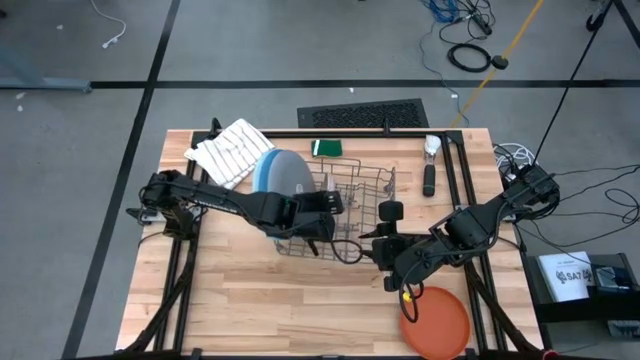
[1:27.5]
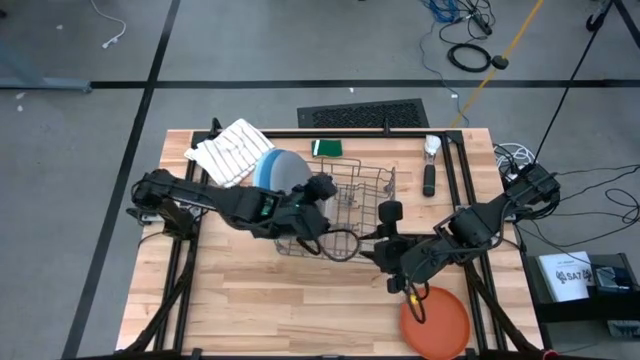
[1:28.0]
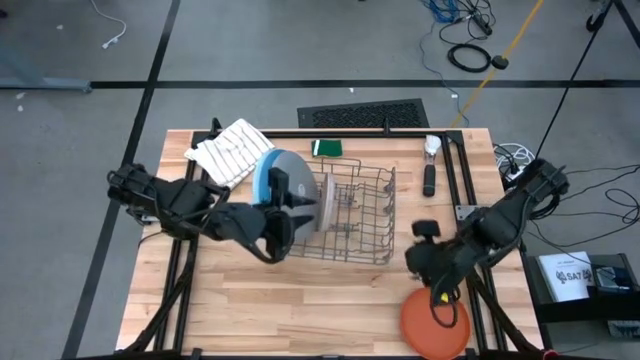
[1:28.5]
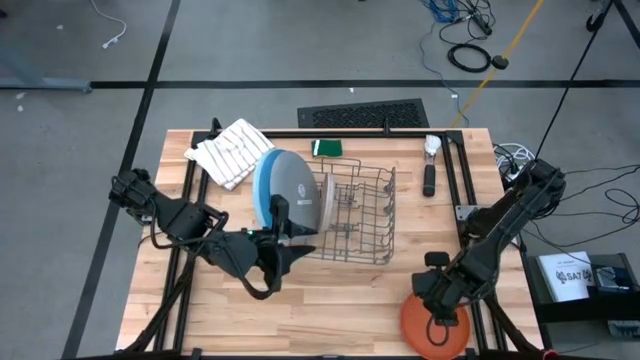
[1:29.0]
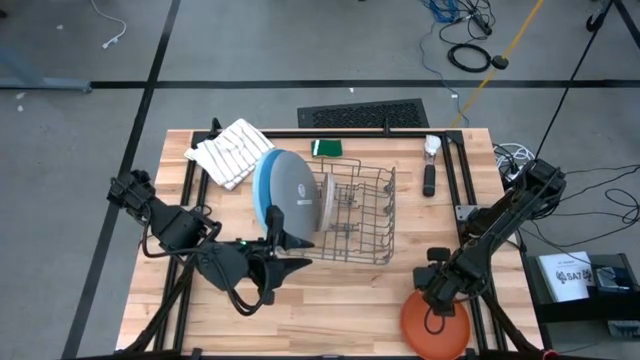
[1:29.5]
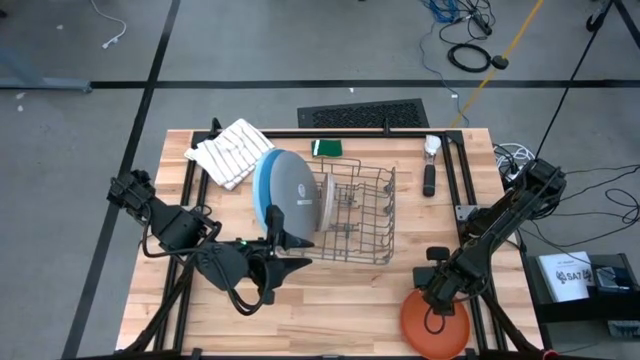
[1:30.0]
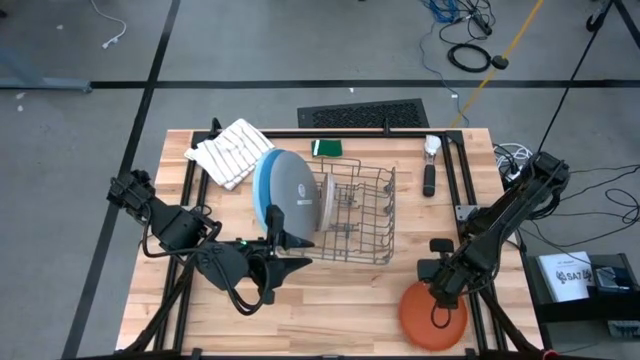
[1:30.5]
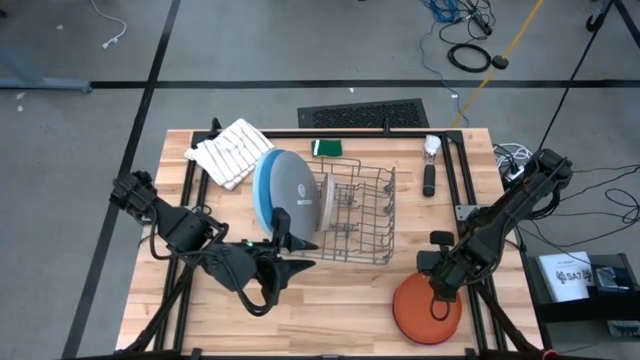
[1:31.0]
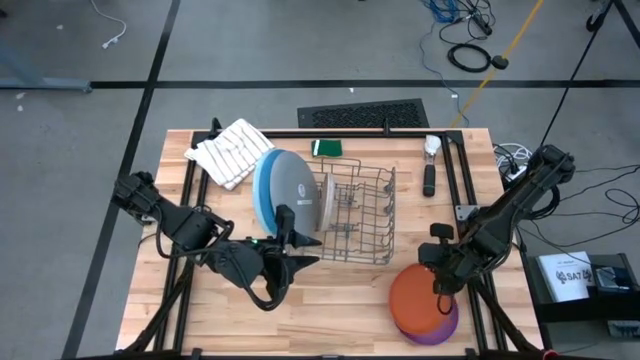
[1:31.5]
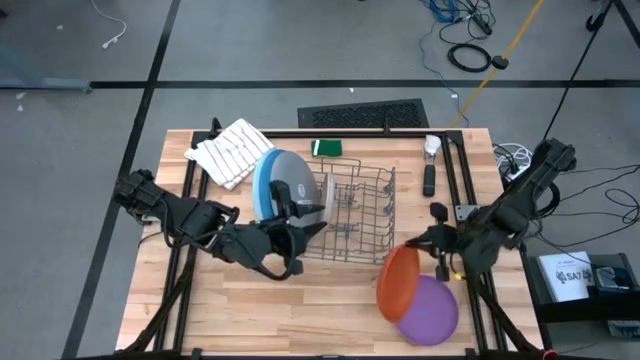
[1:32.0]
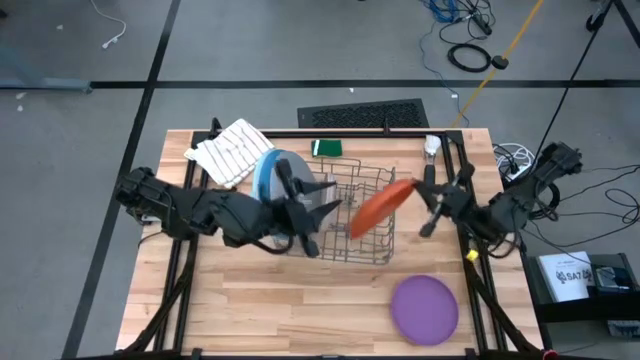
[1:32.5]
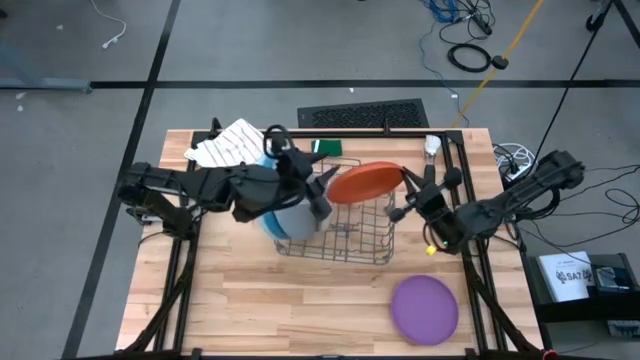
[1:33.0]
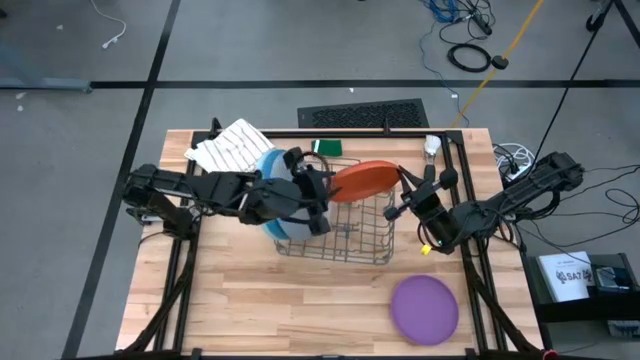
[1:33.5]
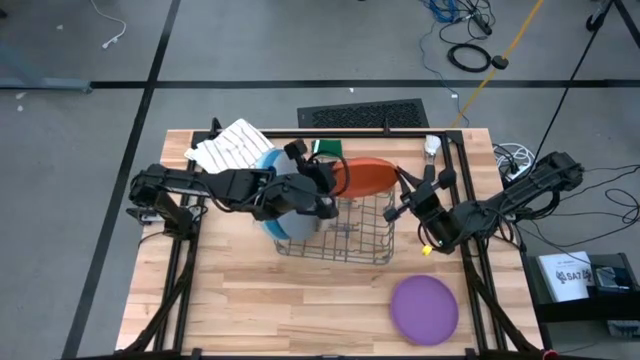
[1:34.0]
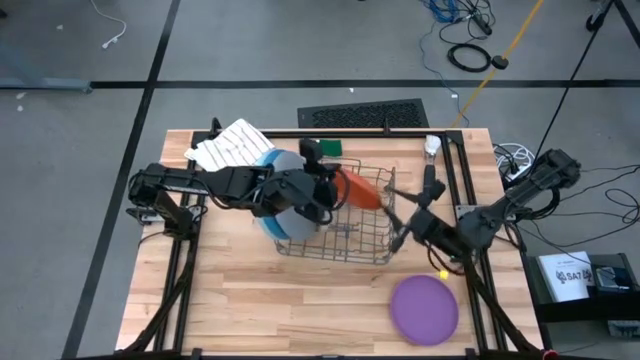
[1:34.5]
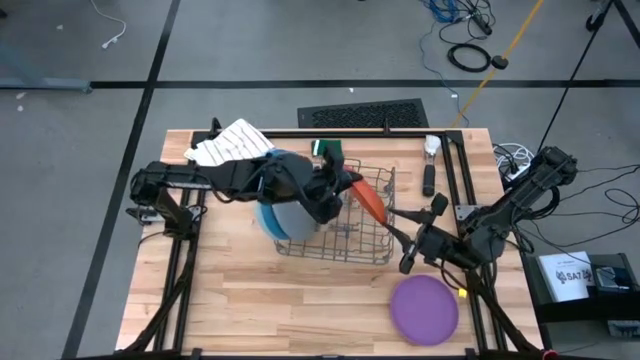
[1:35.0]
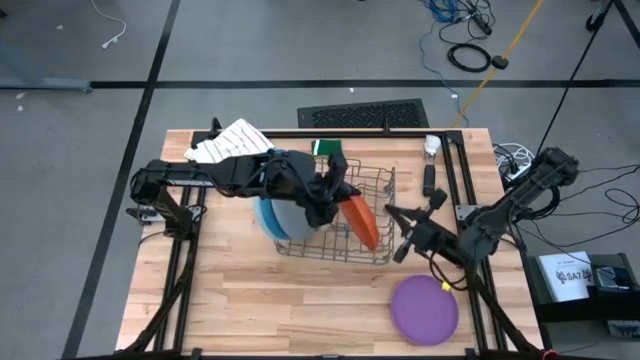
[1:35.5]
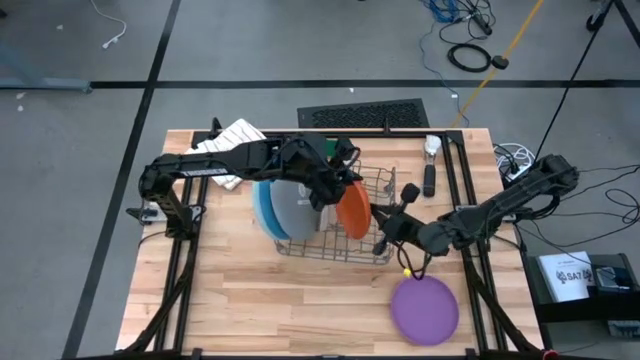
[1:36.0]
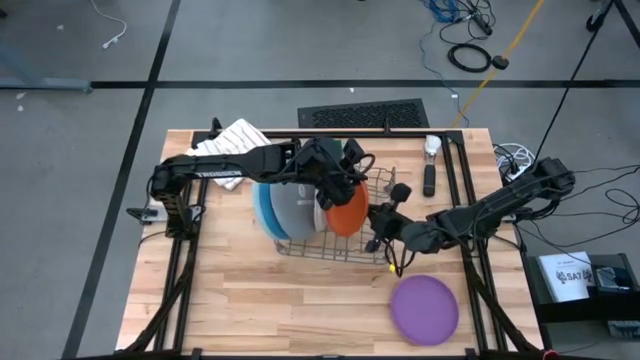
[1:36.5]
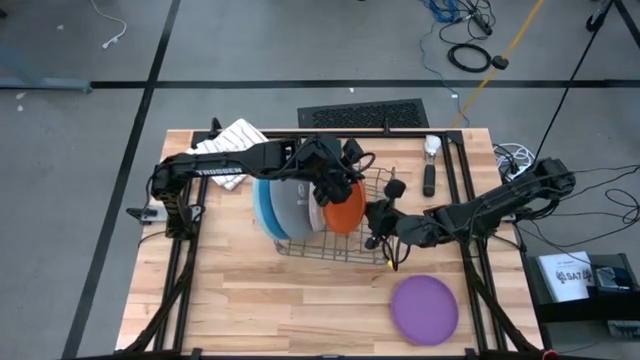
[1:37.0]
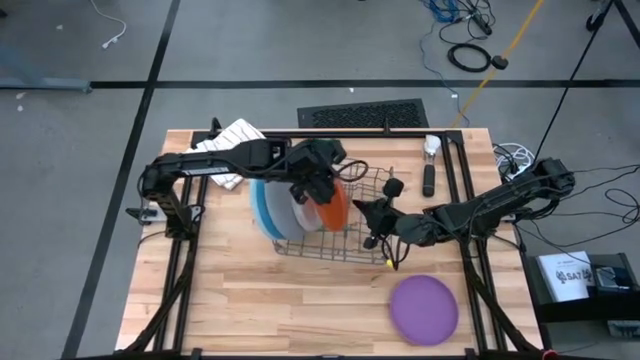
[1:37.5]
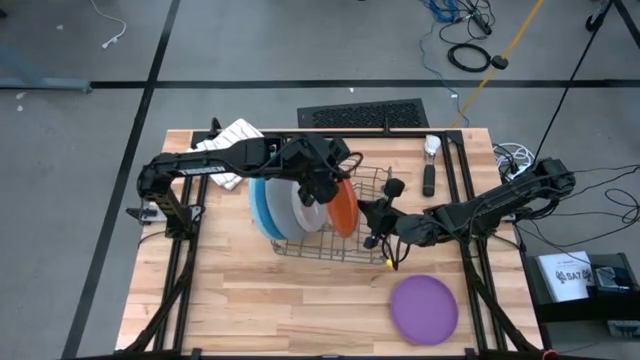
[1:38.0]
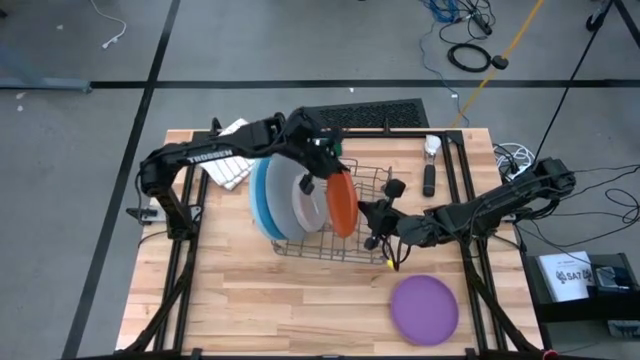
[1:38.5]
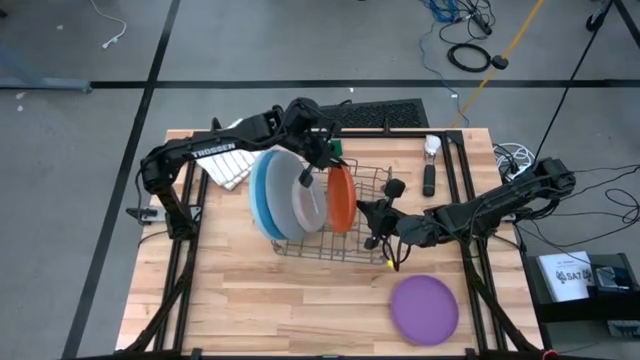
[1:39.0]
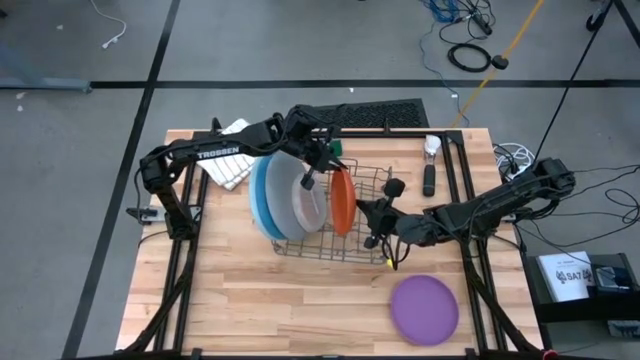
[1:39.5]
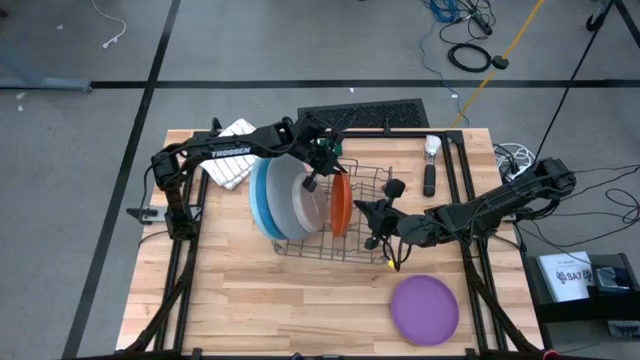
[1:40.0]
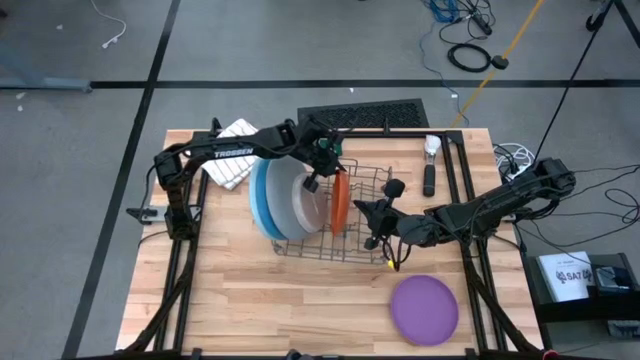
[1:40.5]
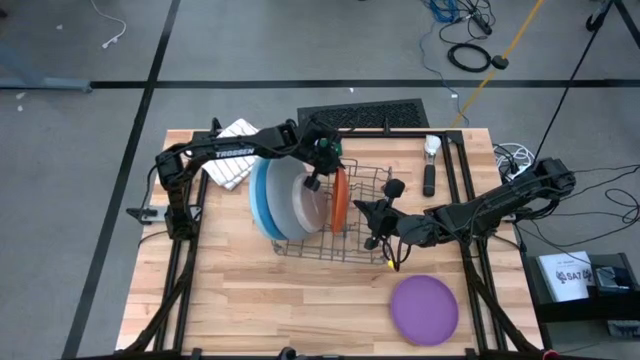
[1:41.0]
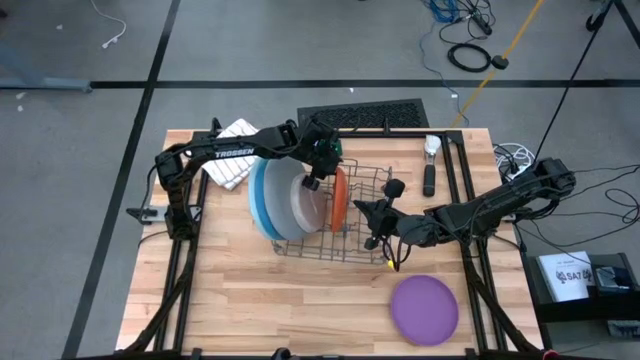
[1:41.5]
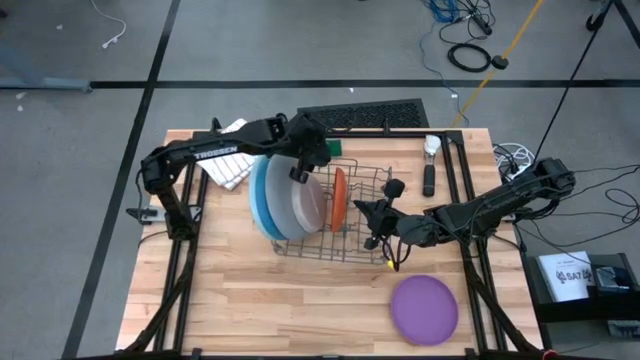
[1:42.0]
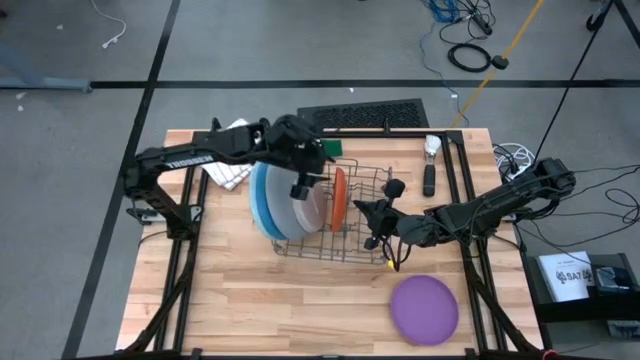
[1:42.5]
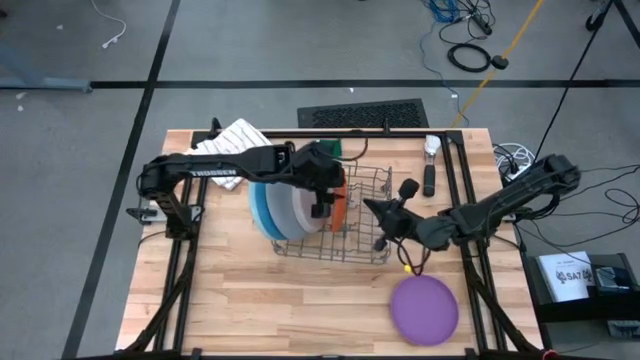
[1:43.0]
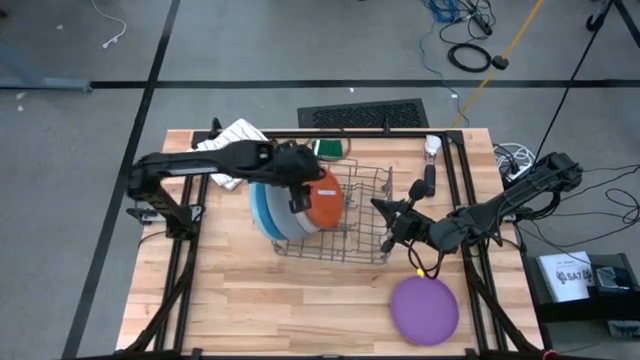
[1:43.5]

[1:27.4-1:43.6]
Task: Sort dishes
Put the orange plate into the dish rack

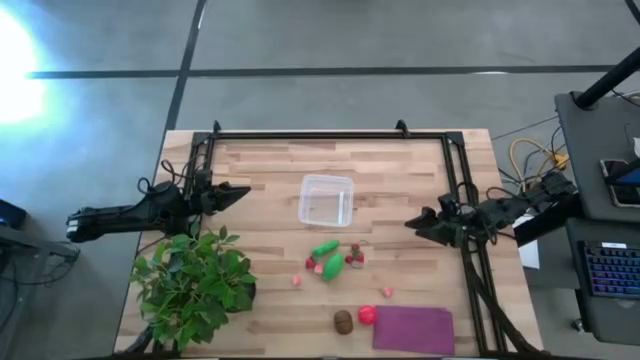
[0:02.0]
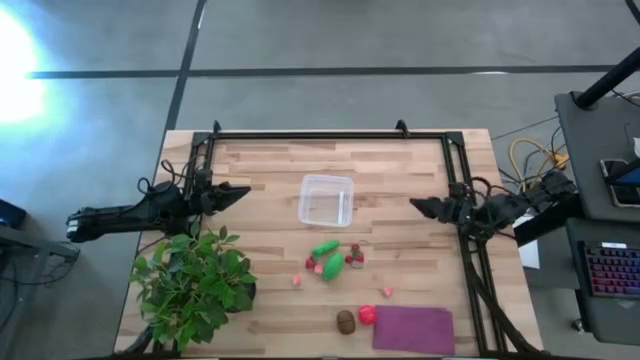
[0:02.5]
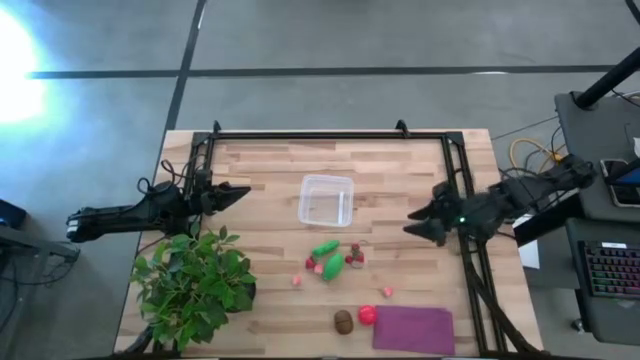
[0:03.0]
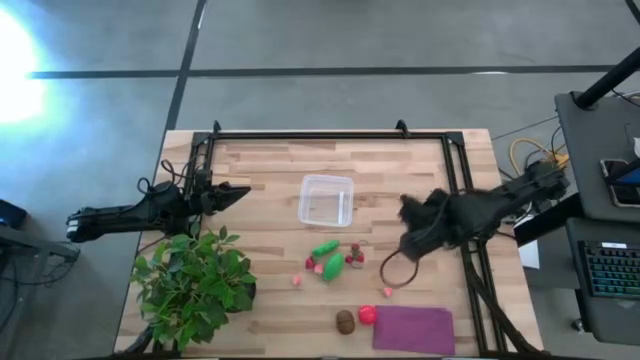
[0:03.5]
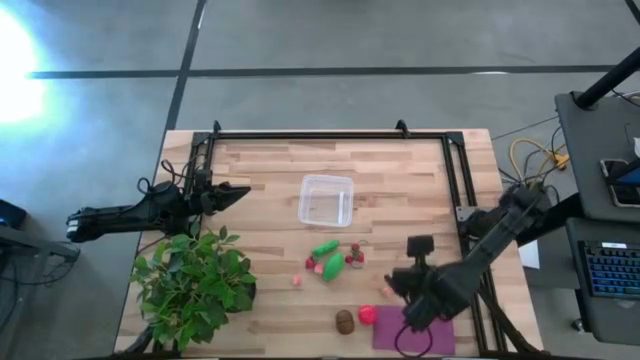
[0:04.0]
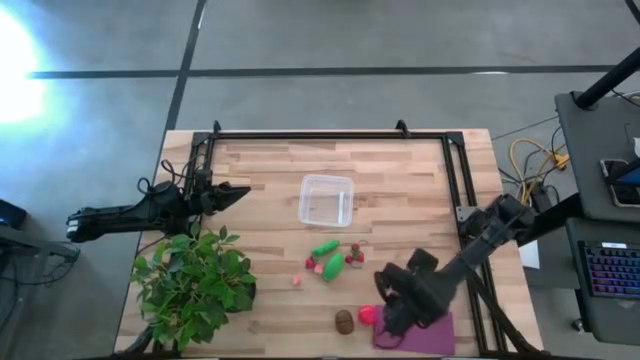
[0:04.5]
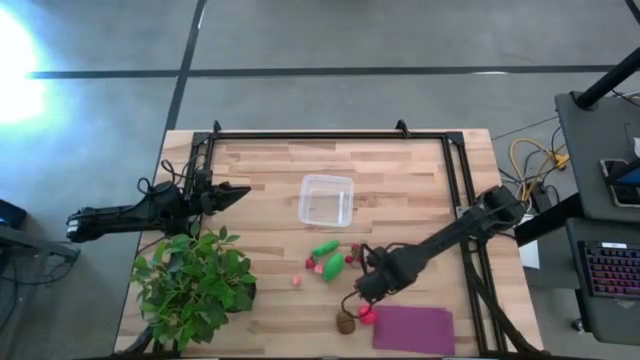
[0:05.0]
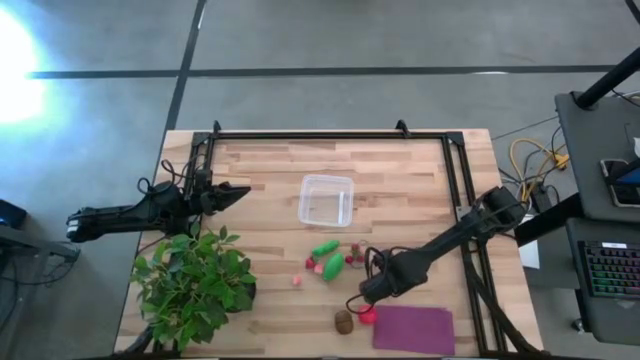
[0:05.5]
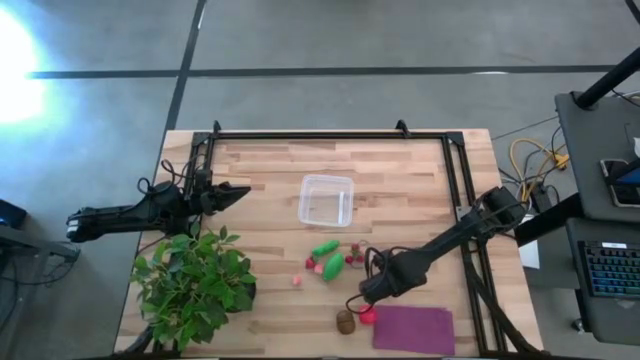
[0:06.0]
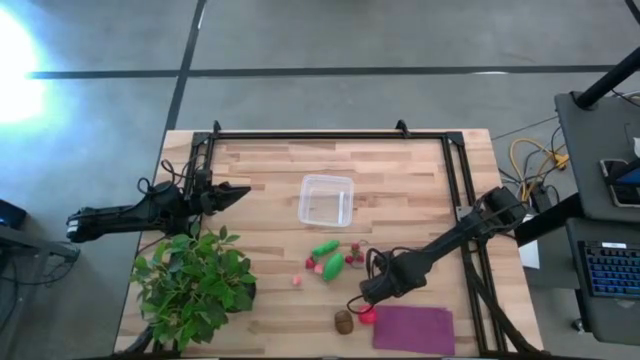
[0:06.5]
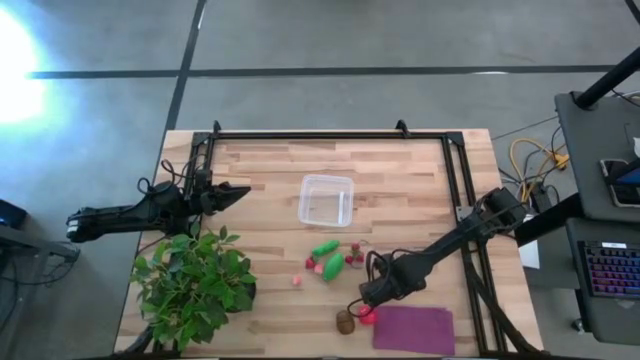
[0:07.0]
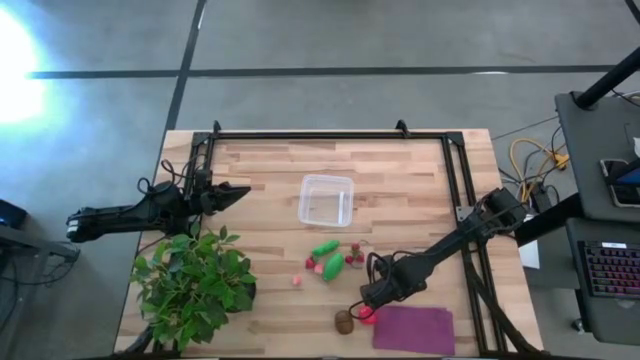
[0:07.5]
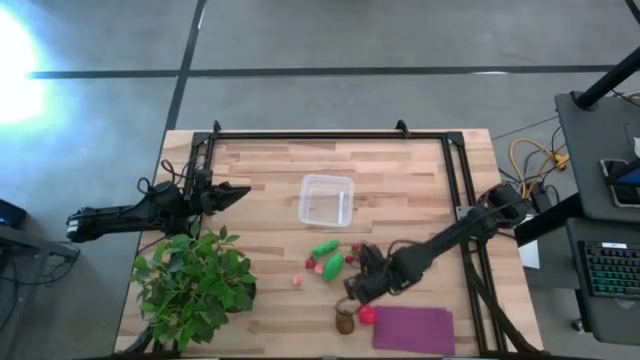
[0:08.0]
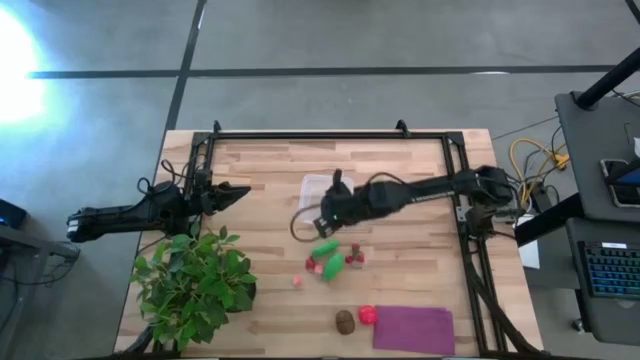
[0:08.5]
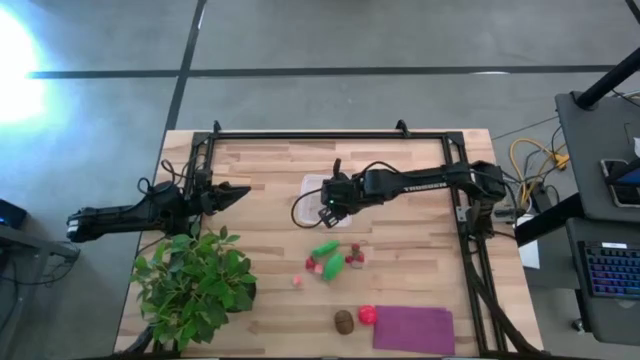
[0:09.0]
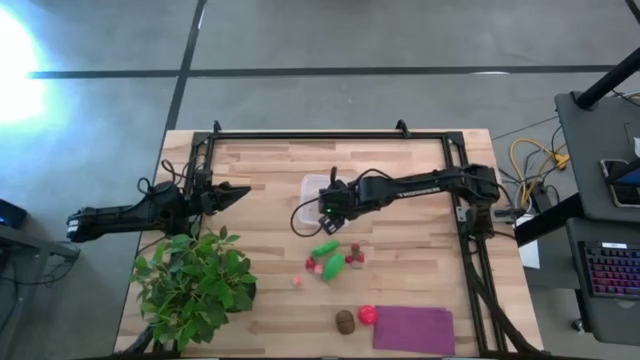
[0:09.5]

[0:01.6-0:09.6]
Task: Pick and placing Produce into tupperware
Put the bottom right pink peach into the transparent bin
